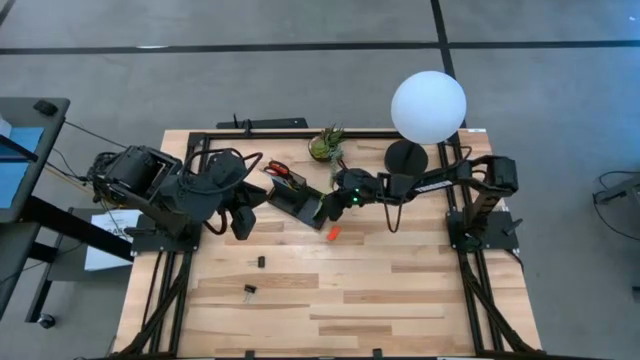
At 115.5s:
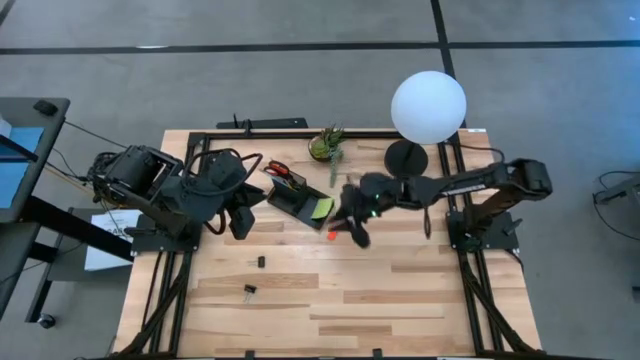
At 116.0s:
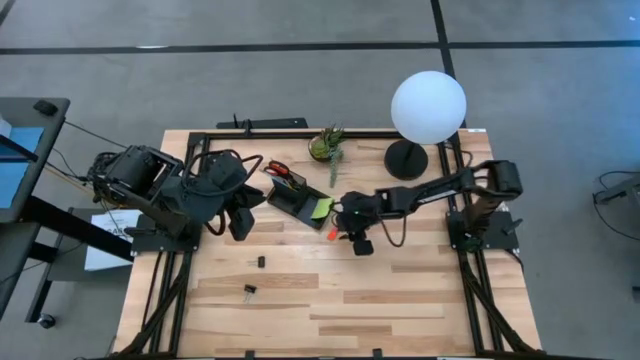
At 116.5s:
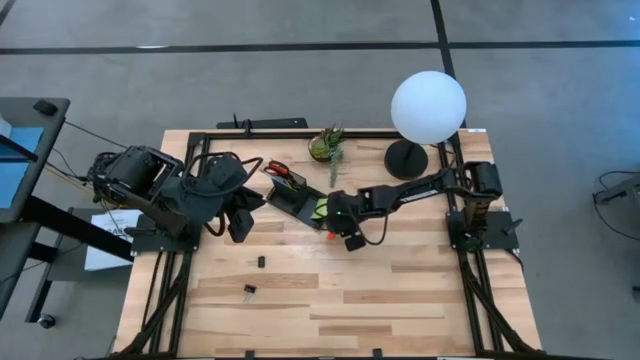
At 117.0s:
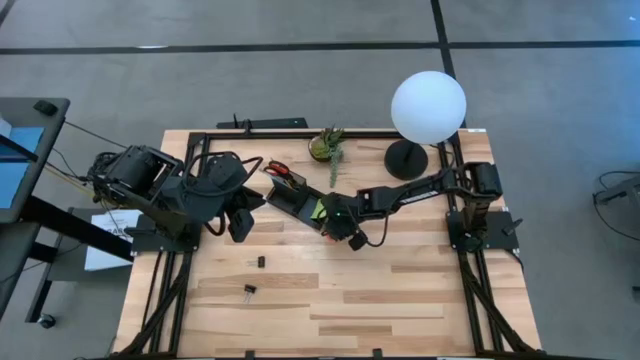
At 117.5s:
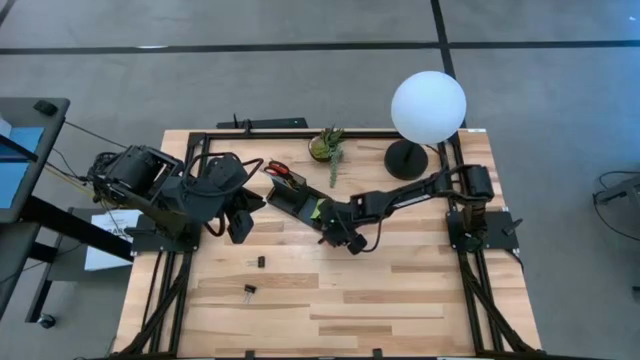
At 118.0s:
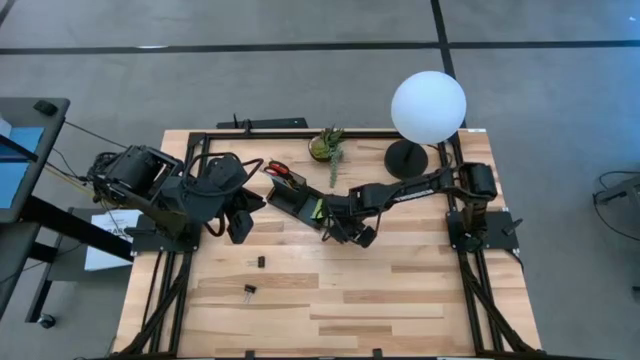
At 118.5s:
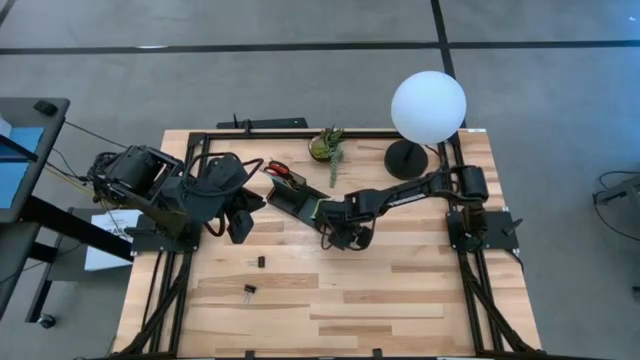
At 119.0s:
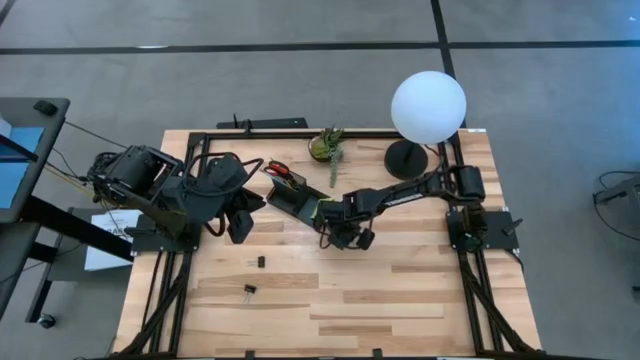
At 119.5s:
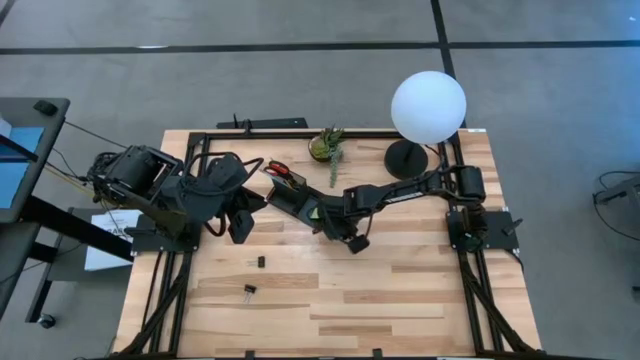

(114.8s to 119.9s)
Task: Pick and place office supplies into organizer
Put the orange eraser into the black desk organizer

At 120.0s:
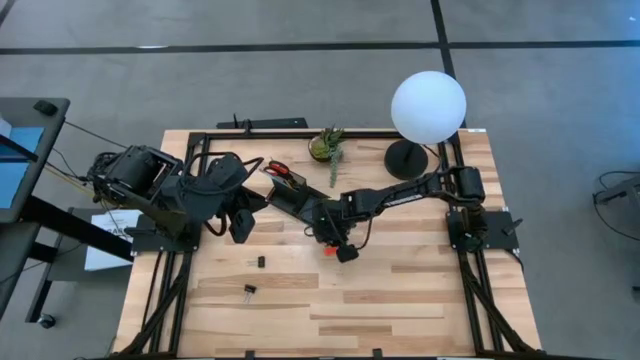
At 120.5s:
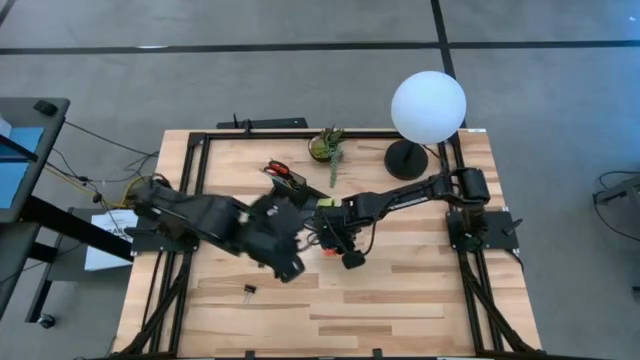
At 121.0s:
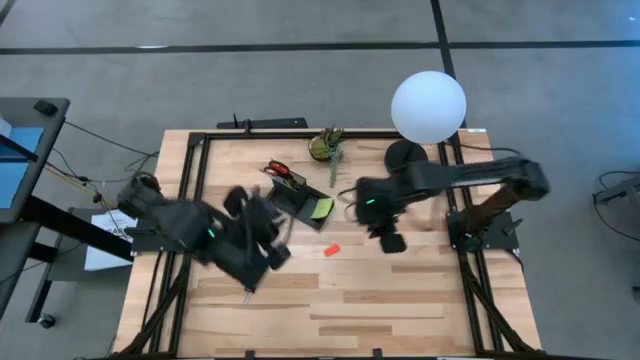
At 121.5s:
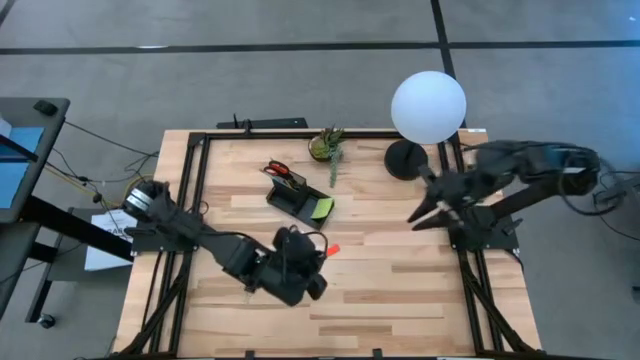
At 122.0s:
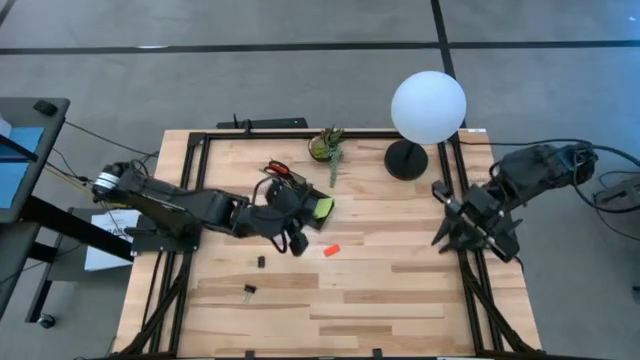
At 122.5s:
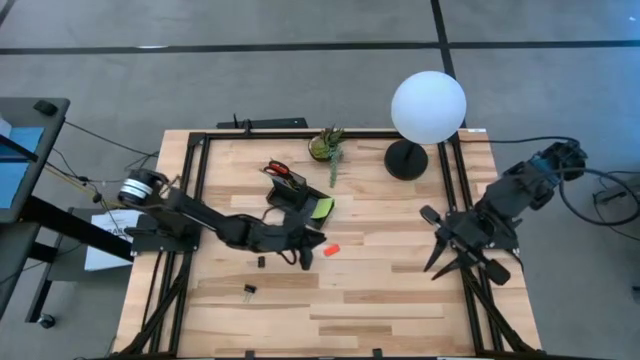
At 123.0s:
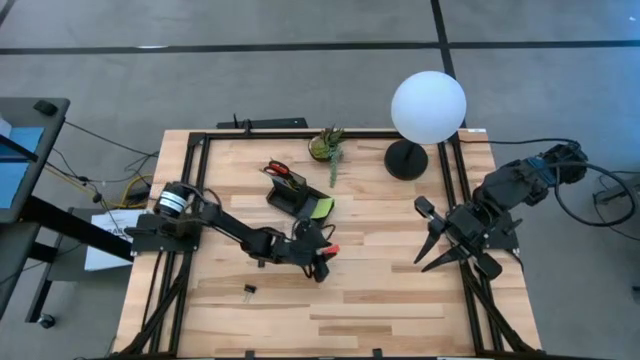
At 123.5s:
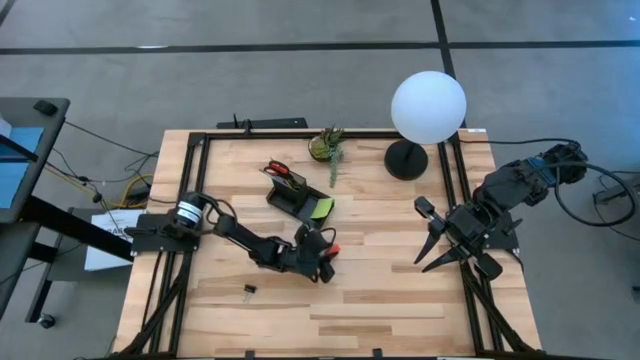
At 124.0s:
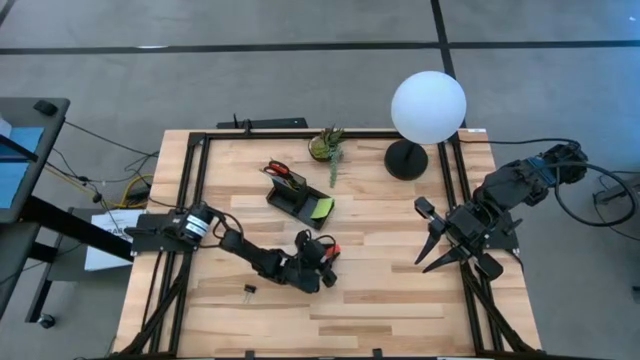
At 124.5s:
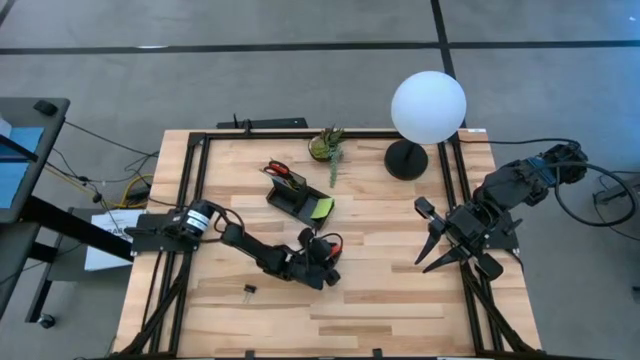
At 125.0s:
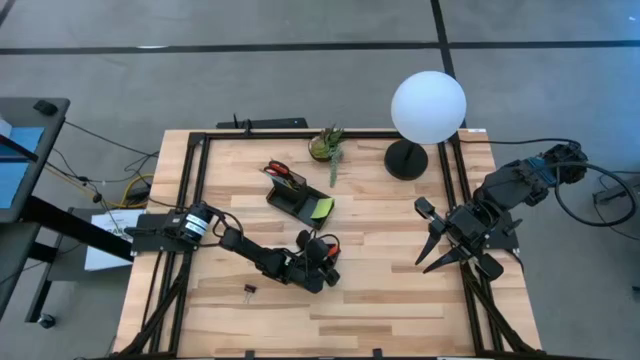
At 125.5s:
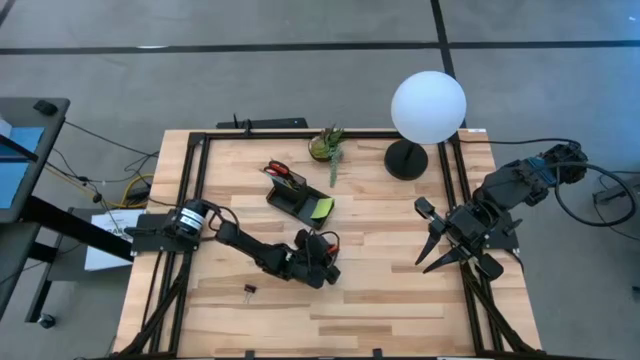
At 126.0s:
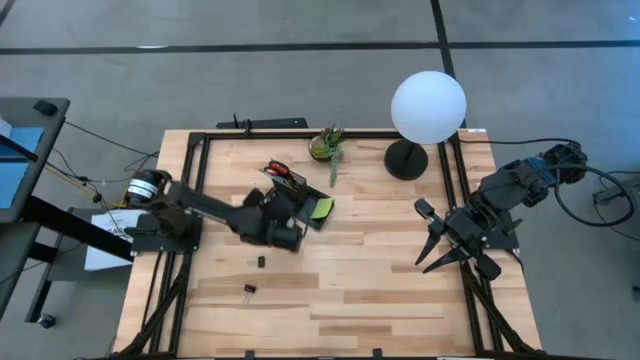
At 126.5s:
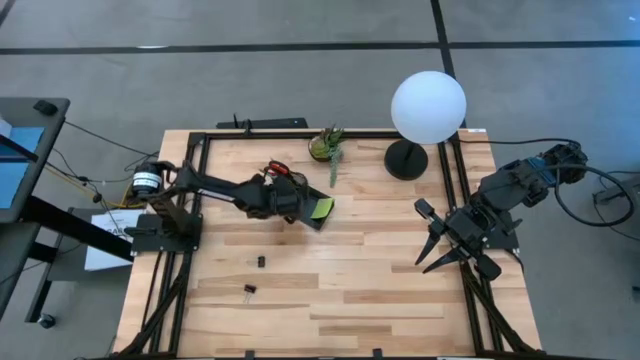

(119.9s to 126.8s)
Put the orange eraser into the black desk organizer

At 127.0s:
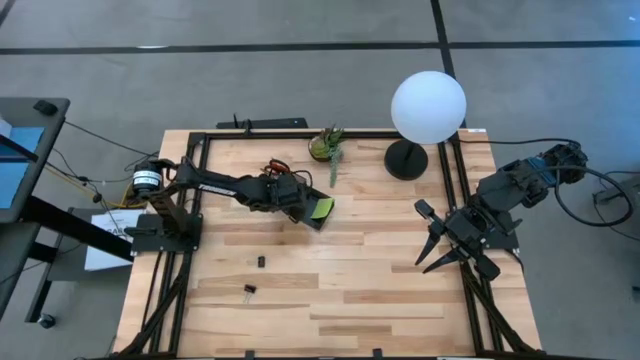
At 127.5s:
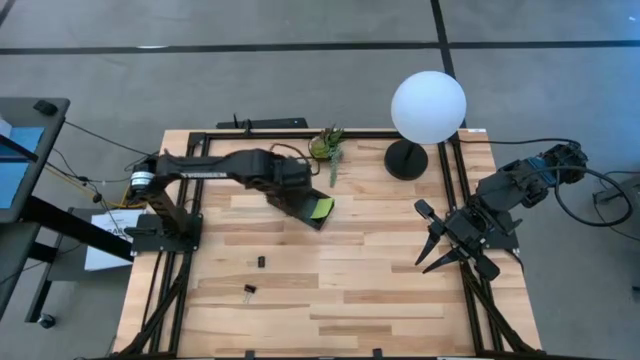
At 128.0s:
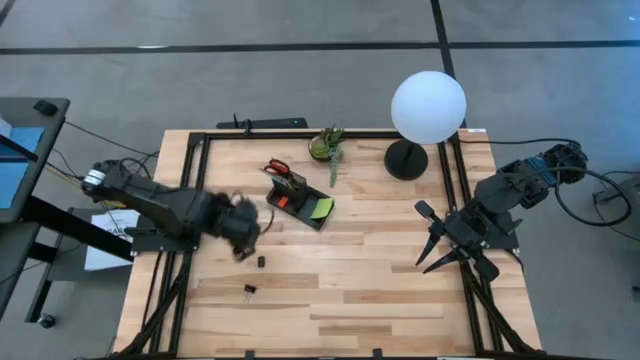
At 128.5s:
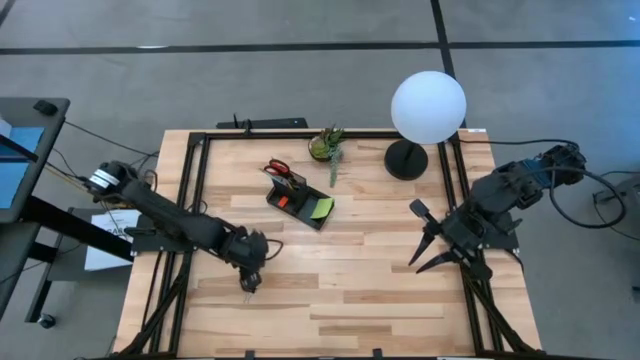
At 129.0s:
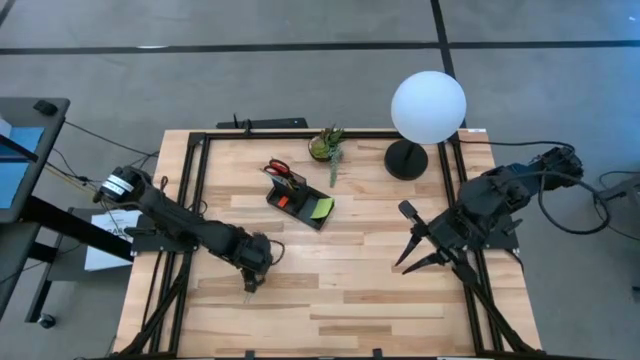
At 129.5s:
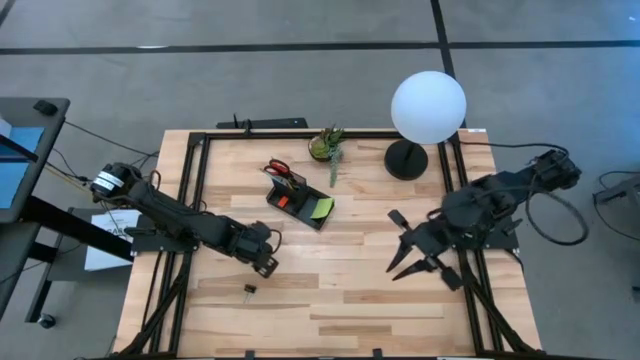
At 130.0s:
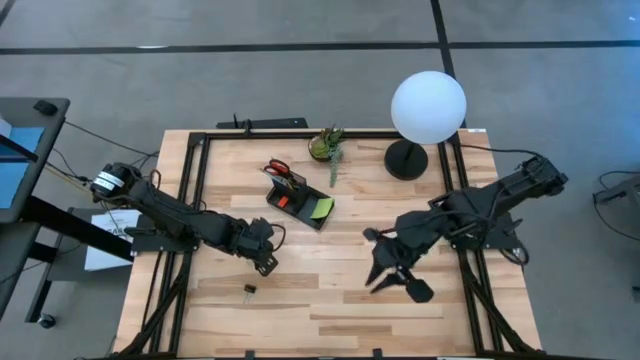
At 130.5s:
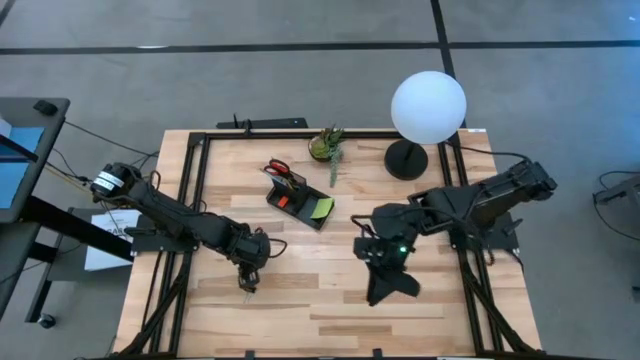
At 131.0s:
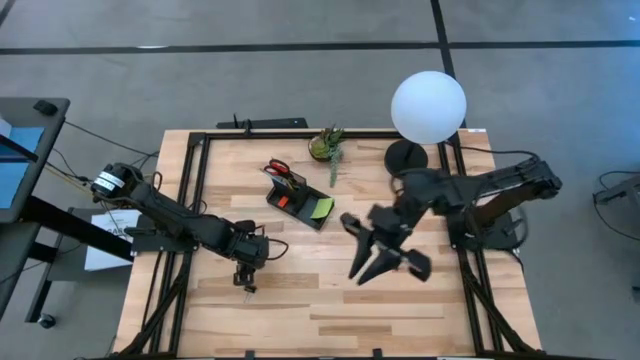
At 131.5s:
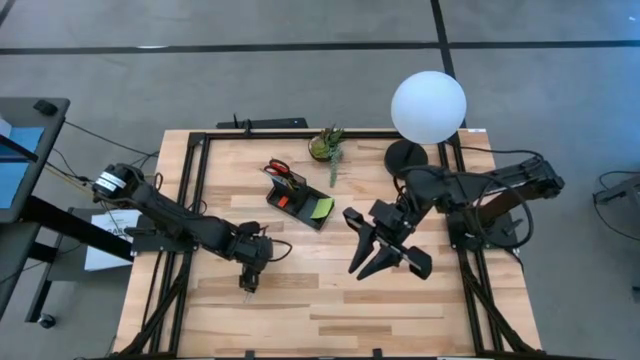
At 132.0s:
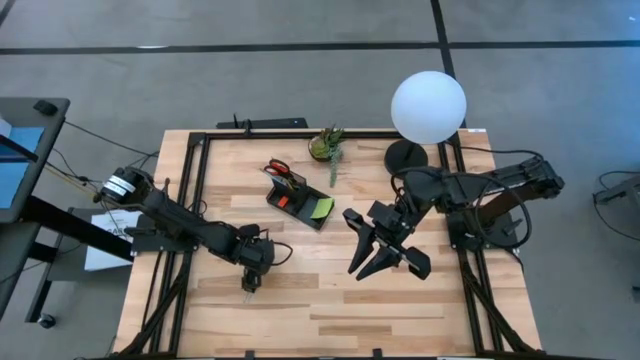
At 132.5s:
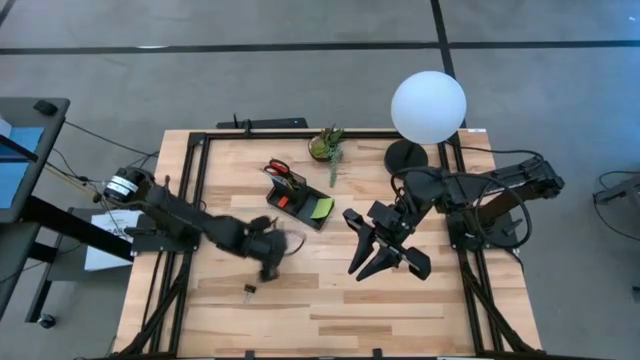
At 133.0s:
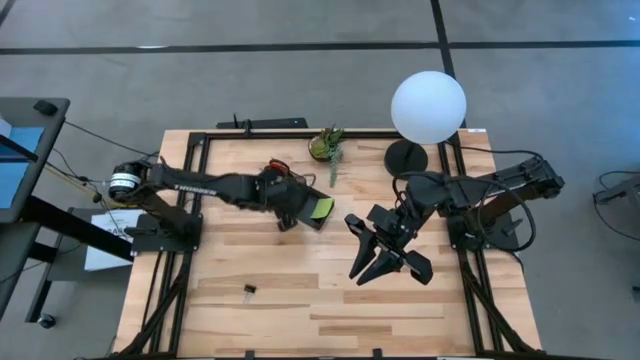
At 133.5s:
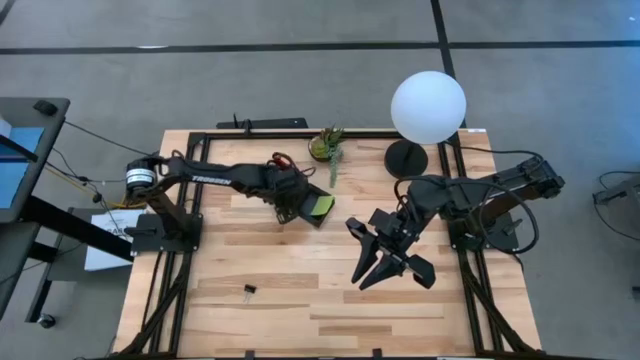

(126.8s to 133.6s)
Put the top binder clip into the black desk organizer
